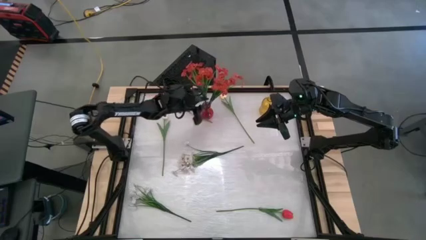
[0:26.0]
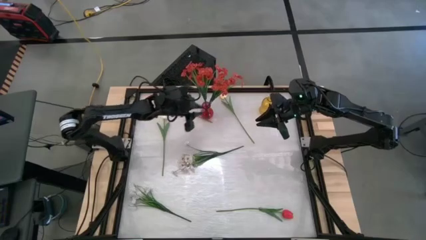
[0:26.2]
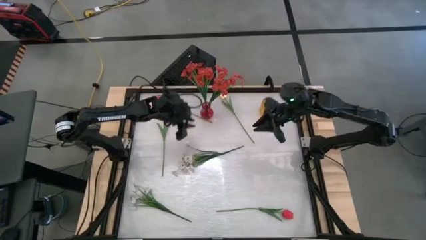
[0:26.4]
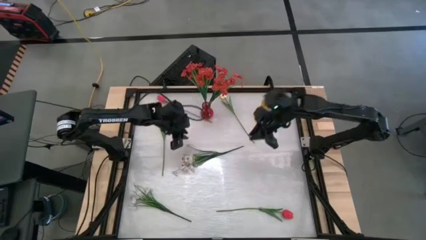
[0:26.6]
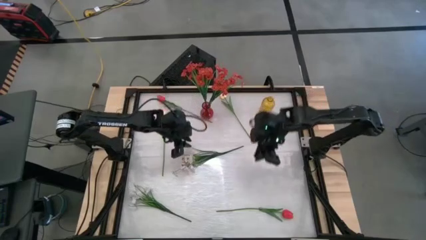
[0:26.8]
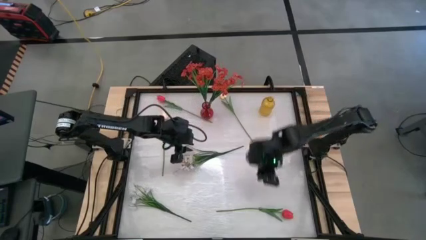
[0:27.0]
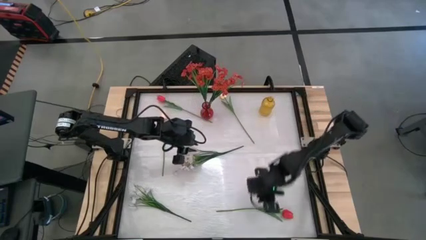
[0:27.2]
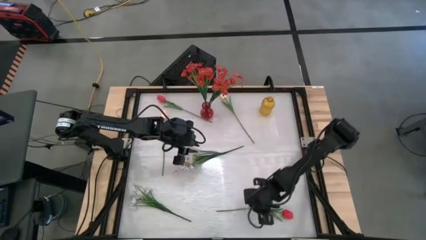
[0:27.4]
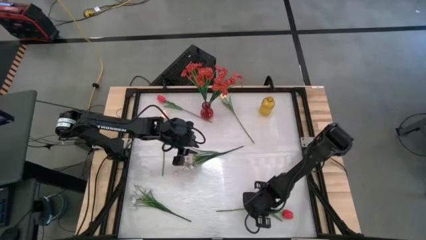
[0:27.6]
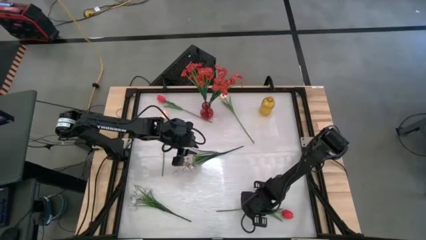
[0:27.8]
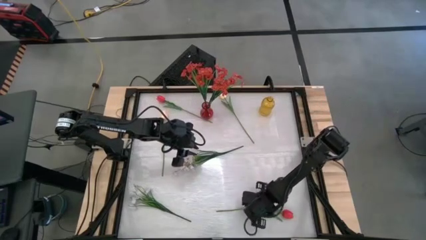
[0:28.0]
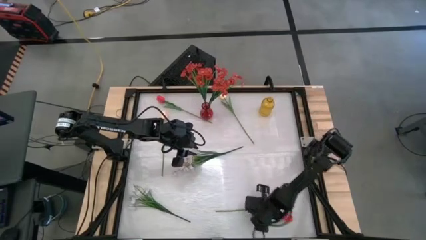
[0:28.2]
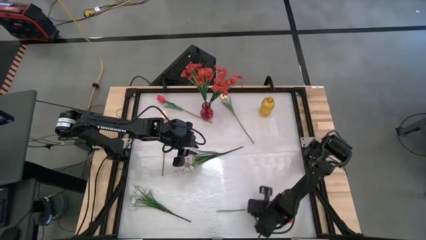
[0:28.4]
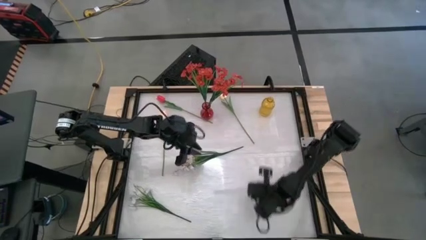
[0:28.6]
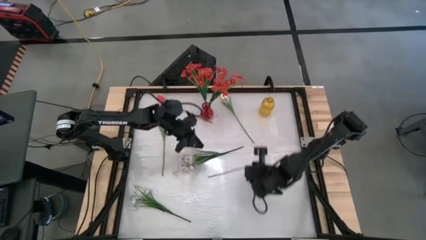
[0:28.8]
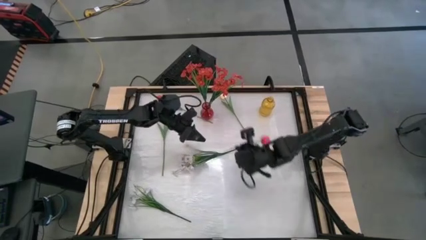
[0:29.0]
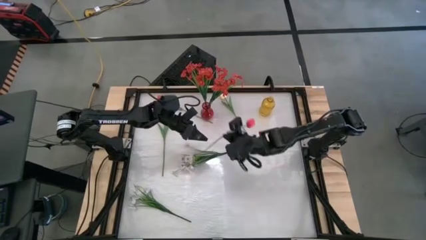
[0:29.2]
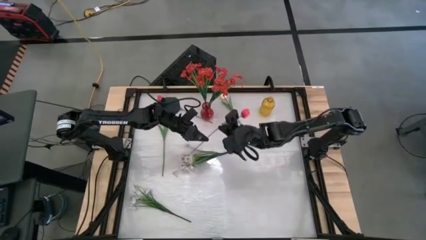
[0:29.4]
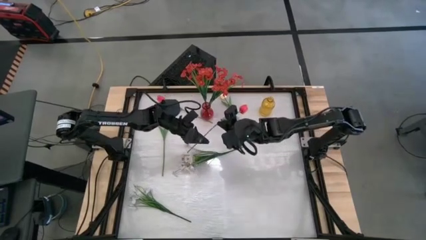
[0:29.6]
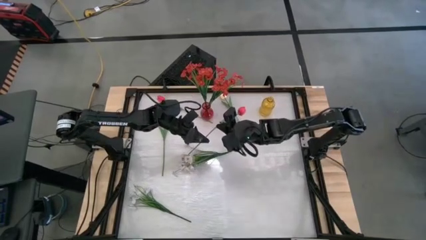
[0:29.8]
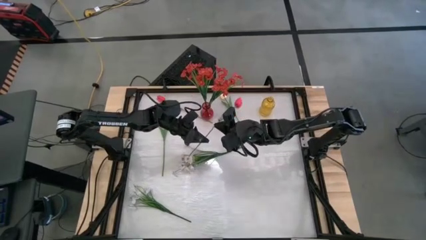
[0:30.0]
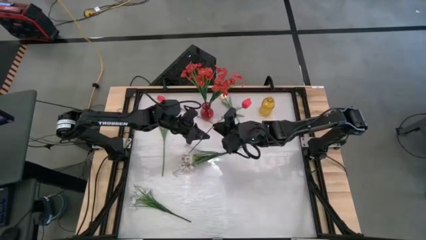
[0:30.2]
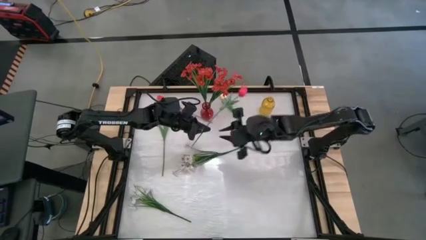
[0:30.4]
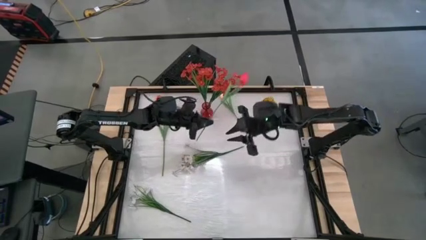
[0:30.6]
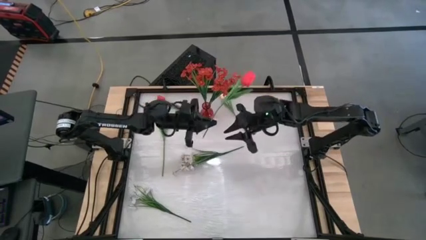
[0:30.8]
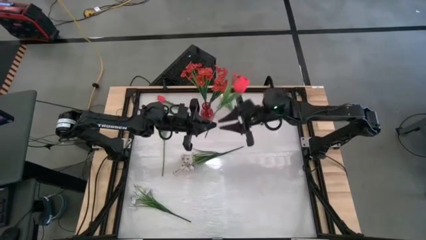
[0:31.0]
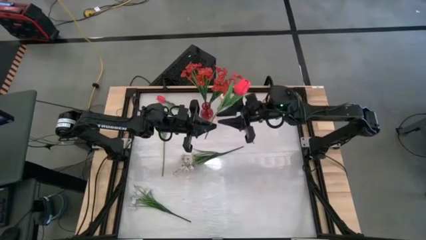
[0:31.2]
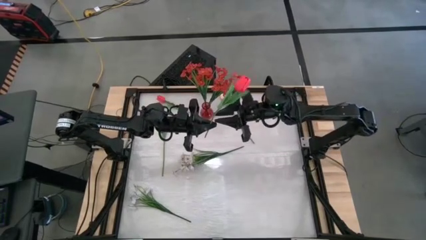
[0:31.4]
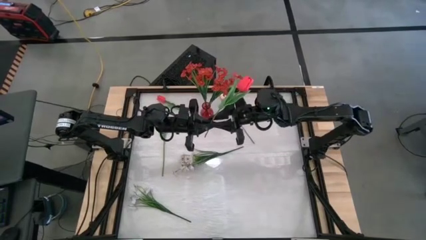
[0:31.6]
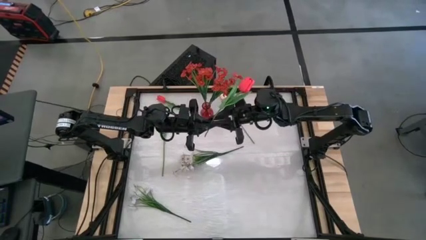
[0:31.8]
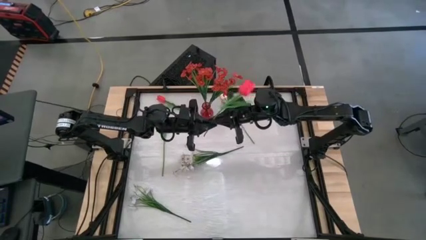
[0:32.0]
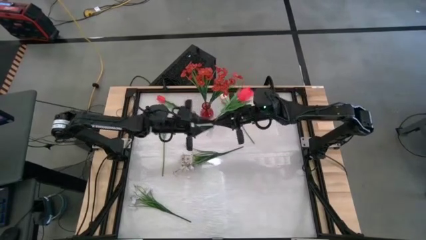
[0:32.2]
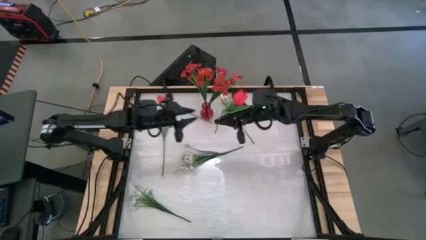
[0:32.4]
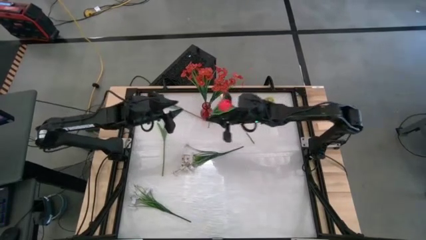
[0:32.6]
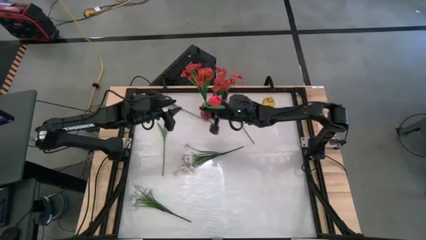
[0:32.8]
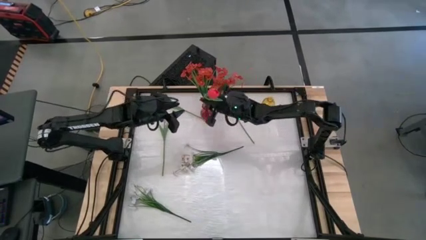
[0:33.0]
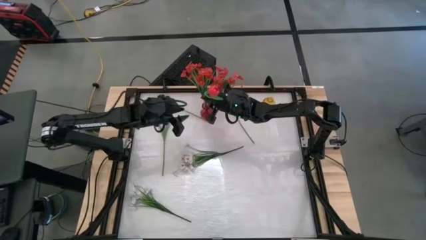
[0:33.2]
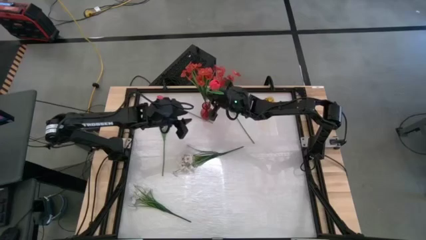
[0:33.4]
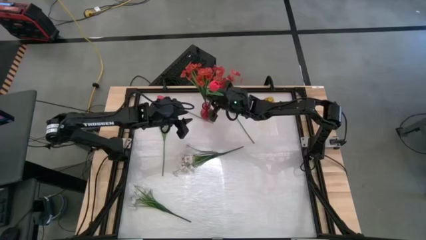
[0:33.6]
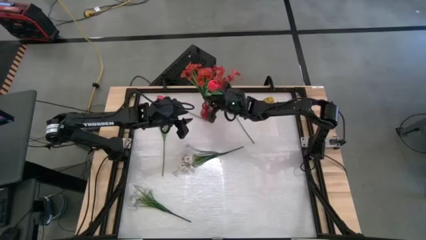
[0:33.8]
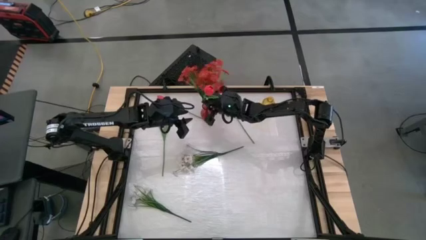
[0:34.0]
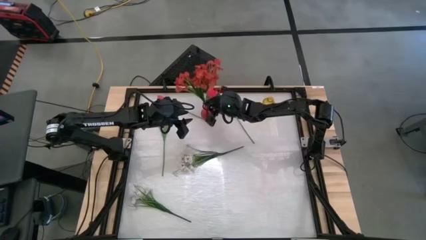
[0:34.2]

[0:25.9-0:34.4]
Task: Sort flowers into vase by color
Put the bottom pink flower into the red vase

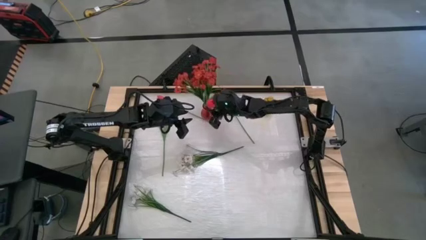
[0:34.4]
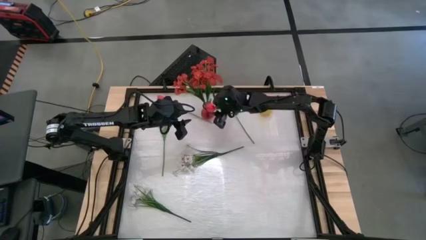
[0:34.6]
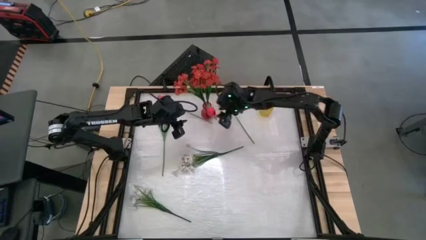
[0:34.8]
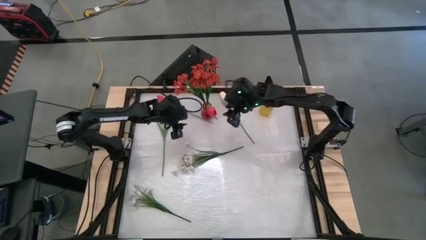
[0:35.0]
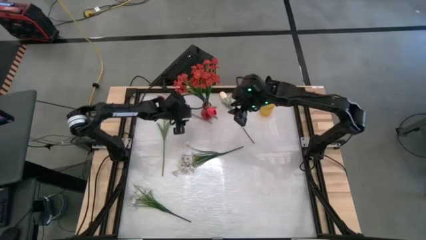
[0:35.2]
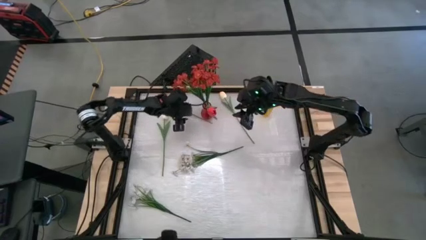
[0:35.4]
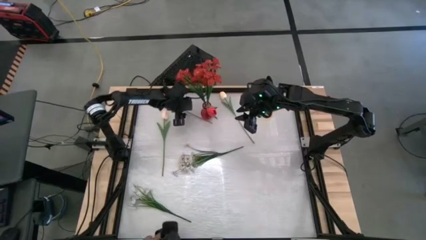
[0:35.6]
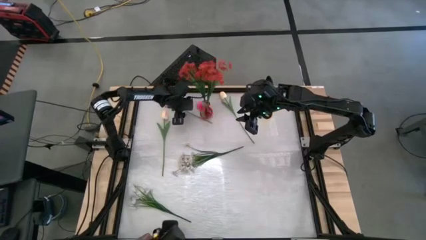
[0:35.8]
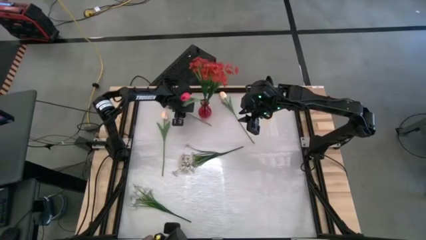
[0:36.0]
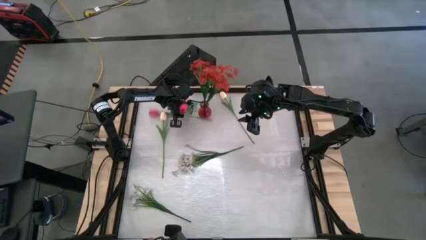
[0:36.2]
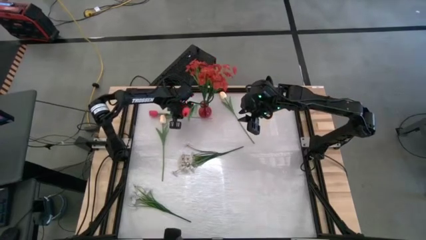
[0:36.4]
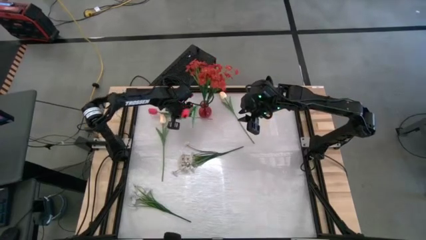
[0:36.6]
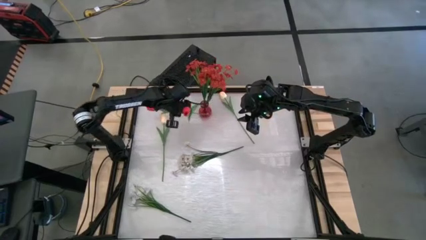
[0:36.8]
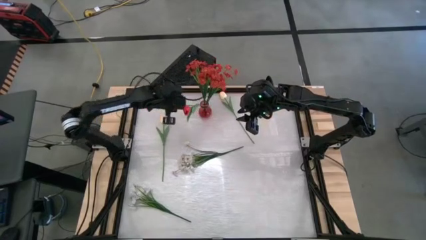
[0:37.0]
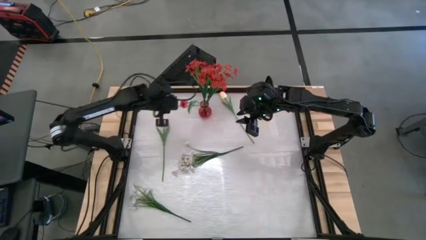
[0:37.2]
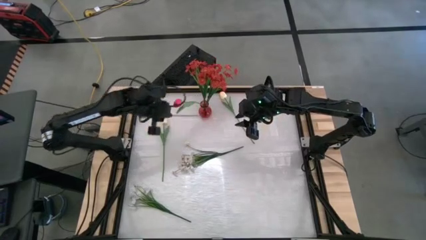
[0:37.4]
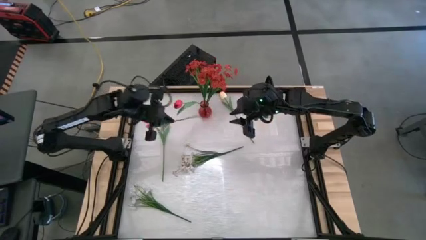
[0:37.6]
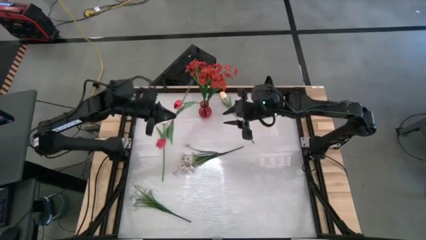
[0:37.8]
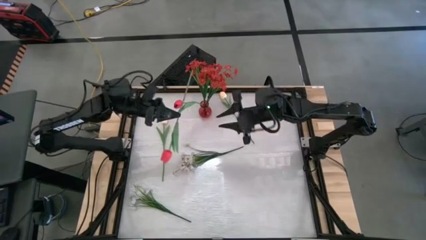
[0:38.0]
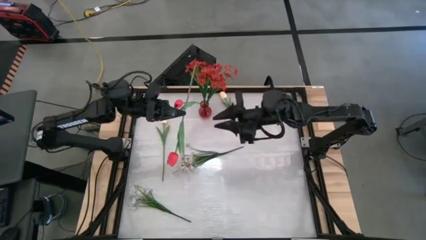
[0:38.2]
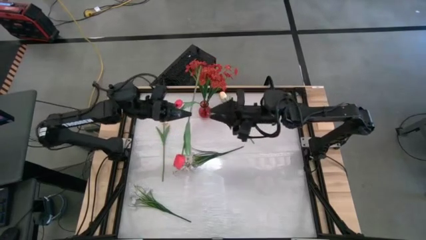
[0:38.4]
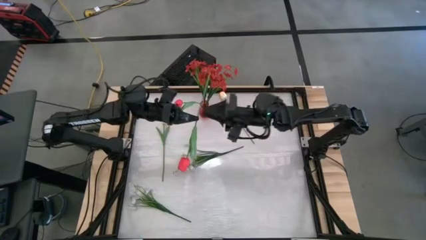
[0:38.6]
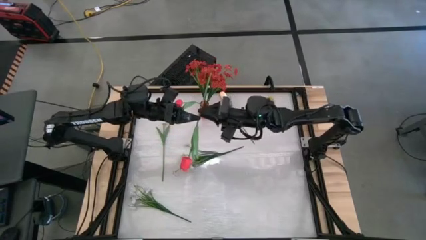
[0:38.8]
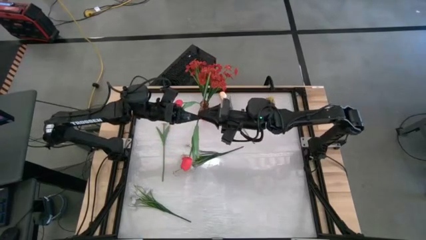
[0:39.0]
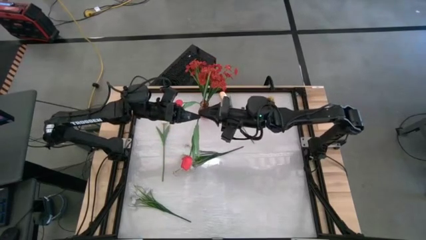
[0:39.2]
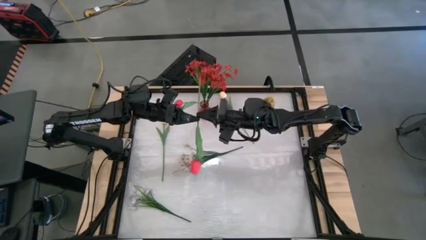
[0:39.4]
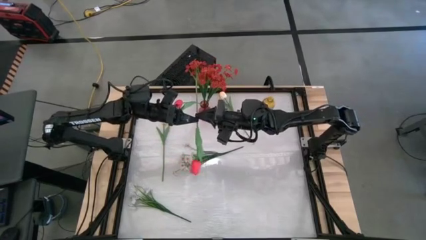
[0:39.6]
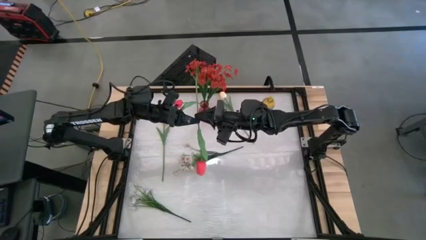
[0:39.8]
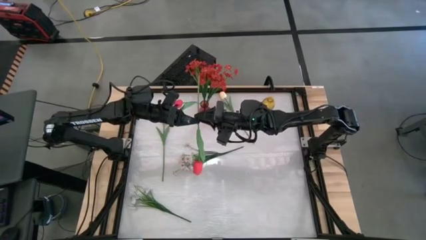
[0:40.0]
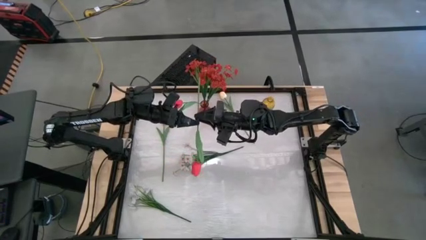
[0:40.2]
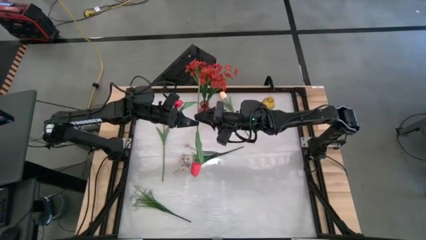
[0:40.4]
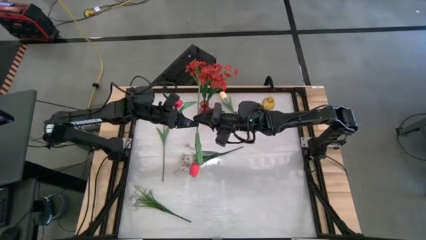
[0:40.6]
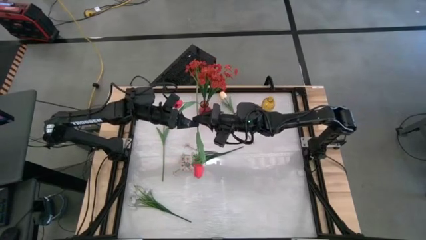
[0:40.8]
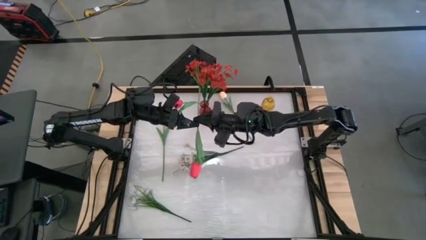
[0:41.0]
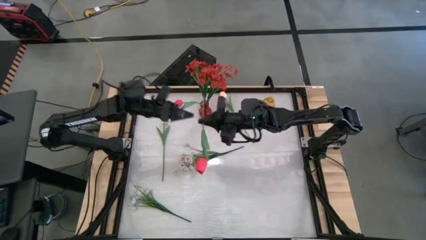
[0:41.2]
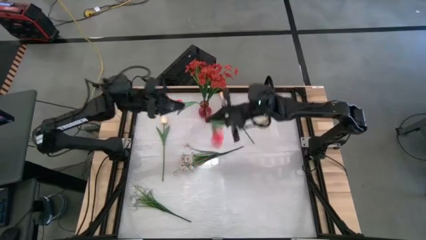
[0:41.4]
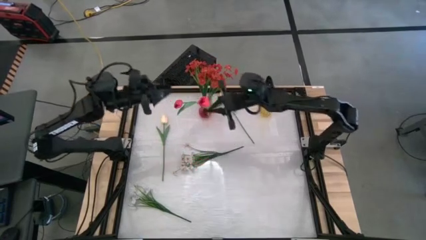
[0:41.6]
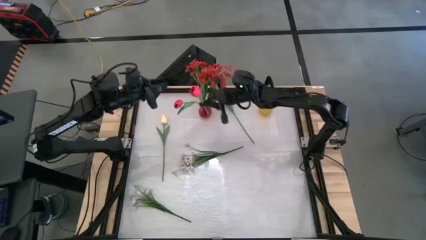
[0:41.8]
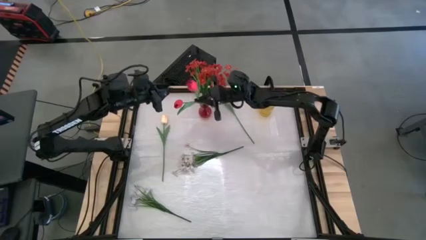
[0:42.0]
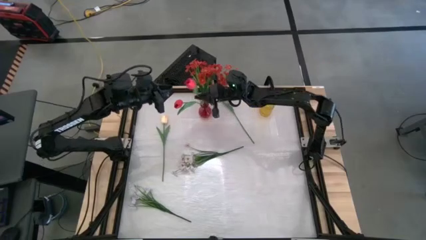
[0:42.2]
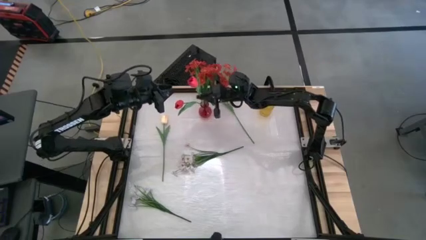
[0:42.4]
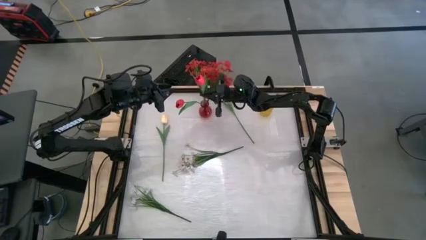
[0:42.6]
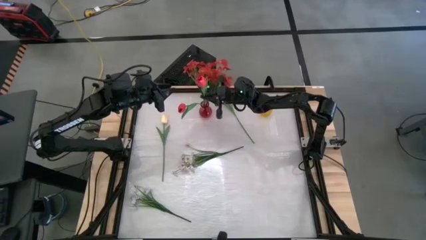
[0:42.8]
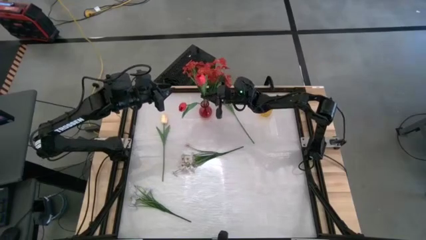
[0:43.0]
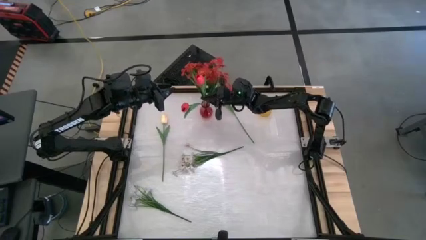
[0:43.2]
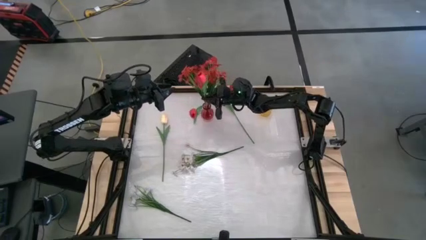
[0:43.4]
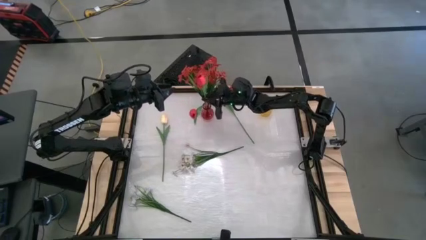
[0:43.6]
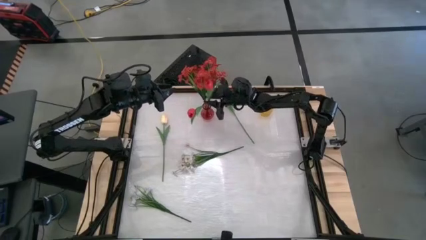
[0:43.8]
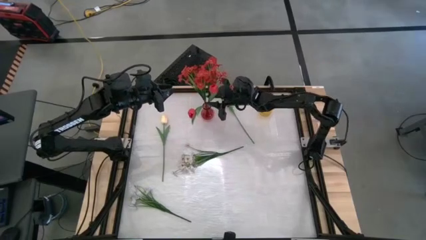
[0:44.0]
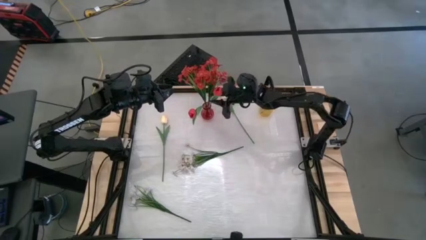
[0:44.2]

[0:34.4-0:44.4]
Put the pink flower into the red vase
